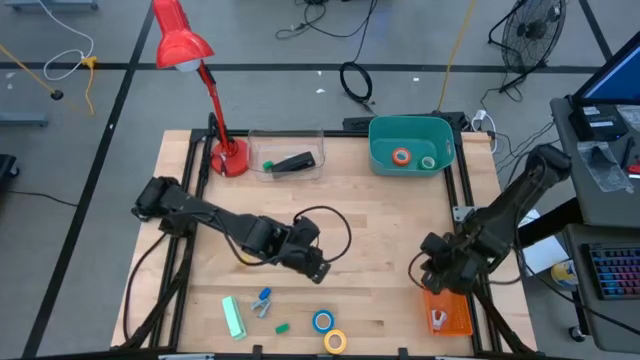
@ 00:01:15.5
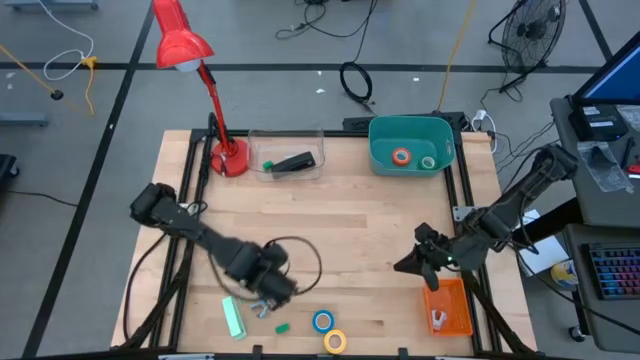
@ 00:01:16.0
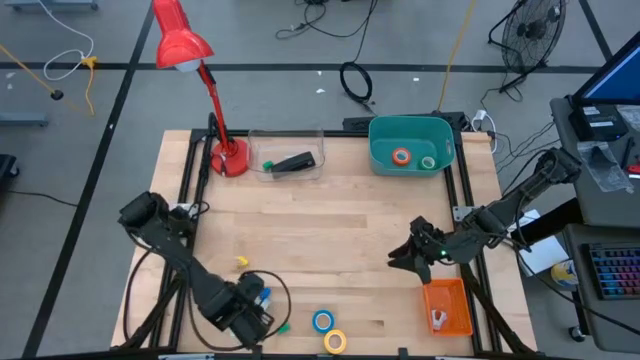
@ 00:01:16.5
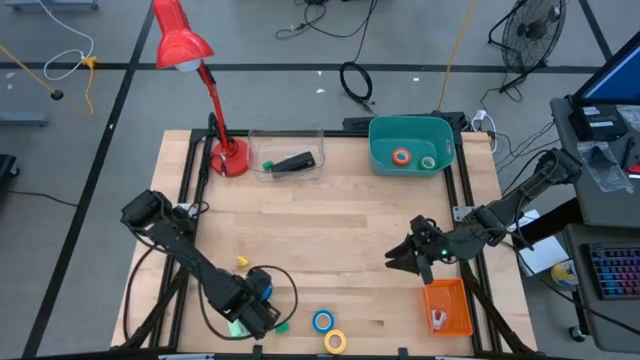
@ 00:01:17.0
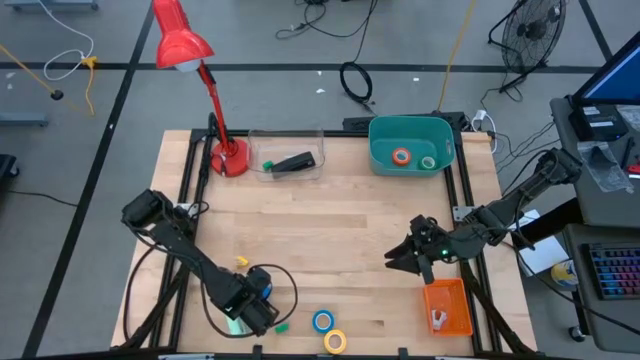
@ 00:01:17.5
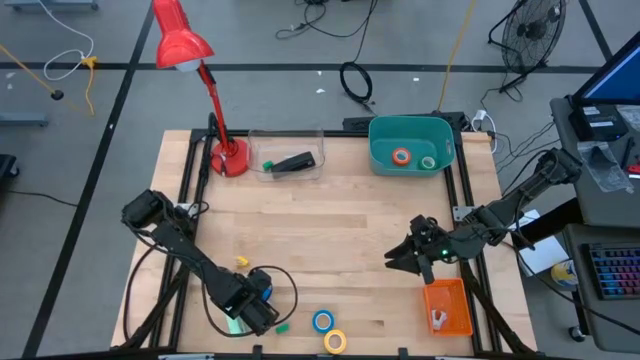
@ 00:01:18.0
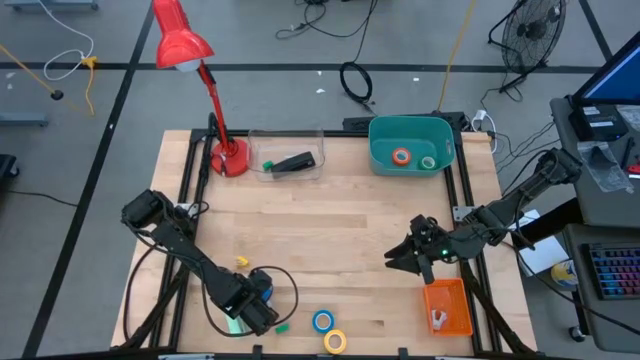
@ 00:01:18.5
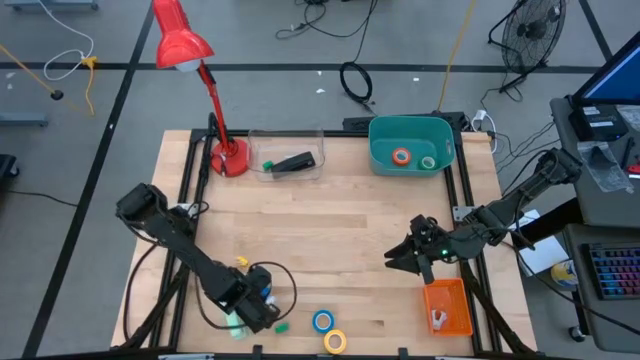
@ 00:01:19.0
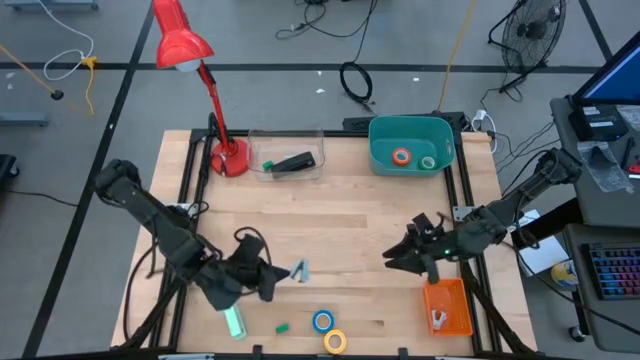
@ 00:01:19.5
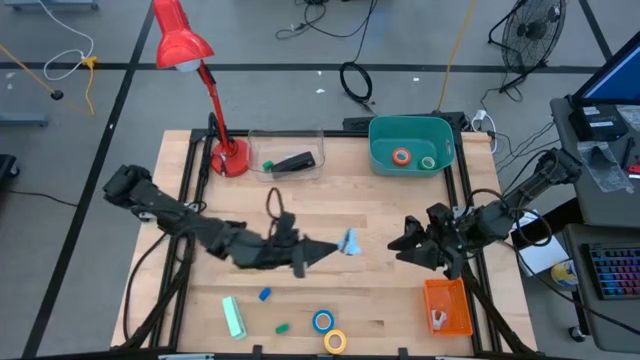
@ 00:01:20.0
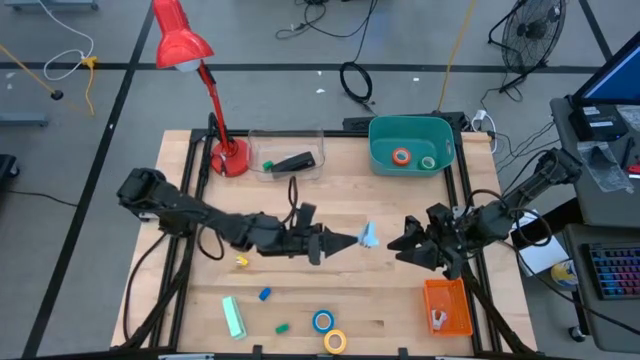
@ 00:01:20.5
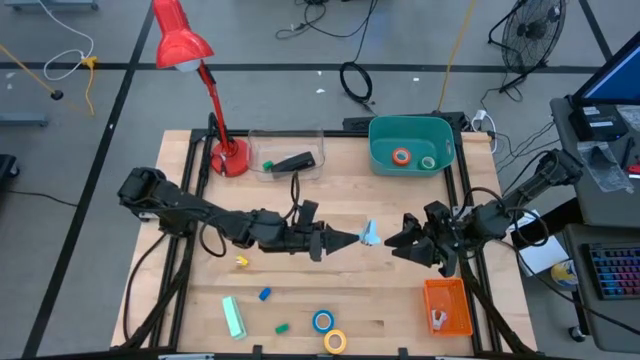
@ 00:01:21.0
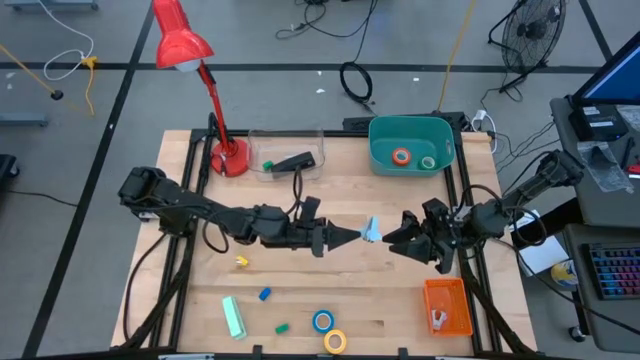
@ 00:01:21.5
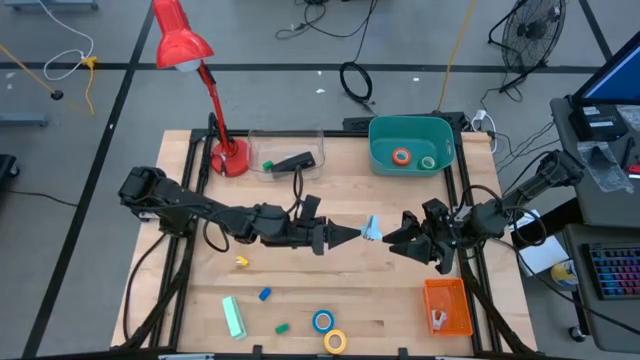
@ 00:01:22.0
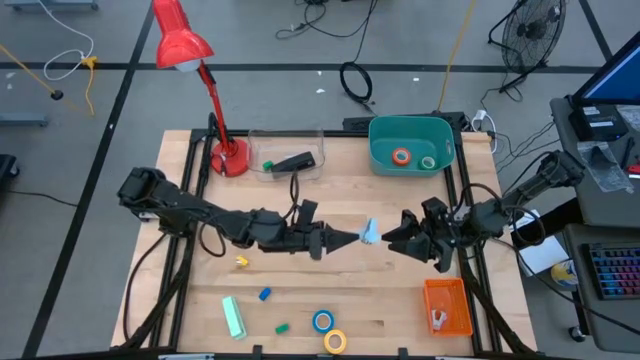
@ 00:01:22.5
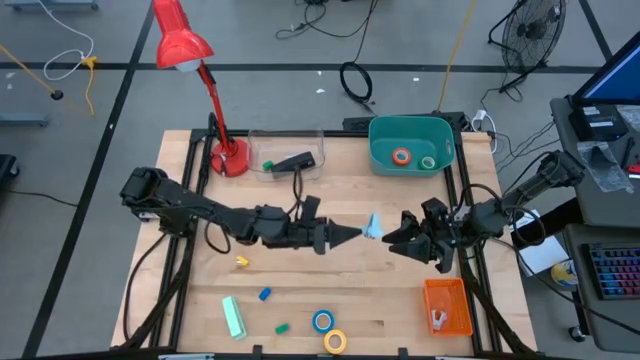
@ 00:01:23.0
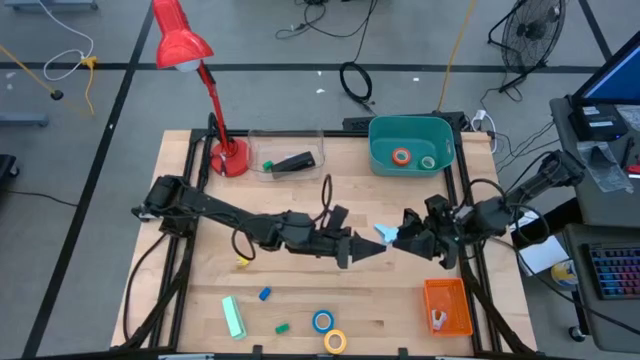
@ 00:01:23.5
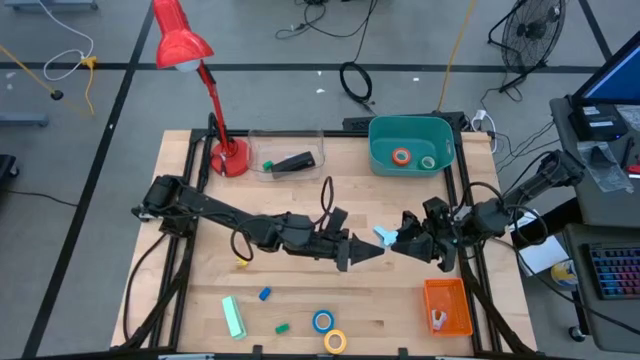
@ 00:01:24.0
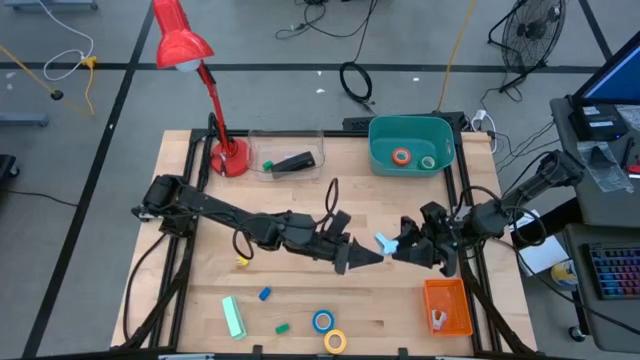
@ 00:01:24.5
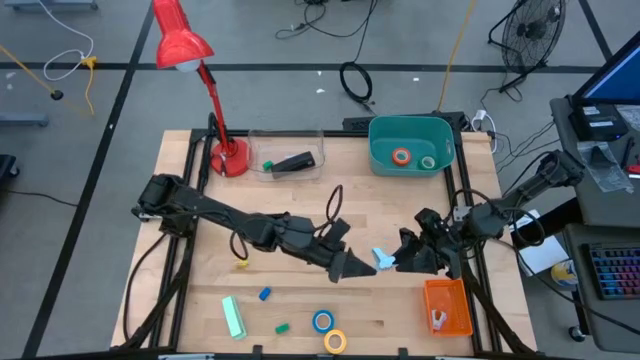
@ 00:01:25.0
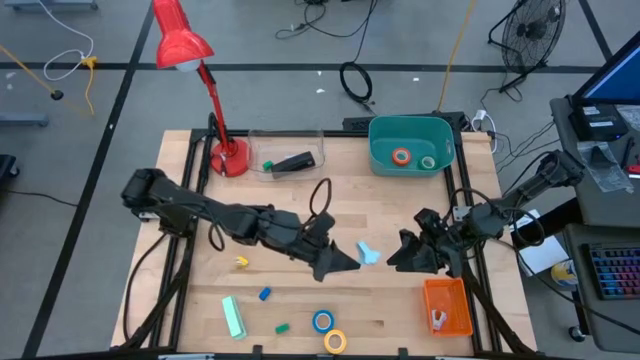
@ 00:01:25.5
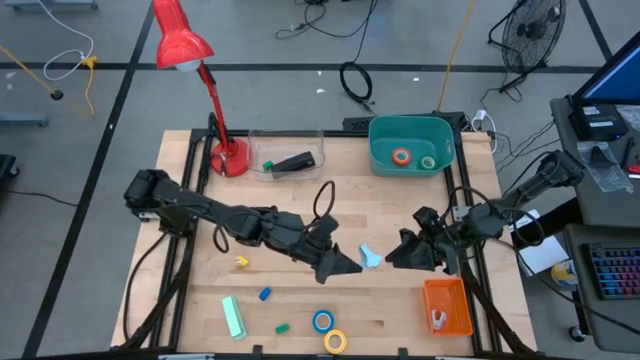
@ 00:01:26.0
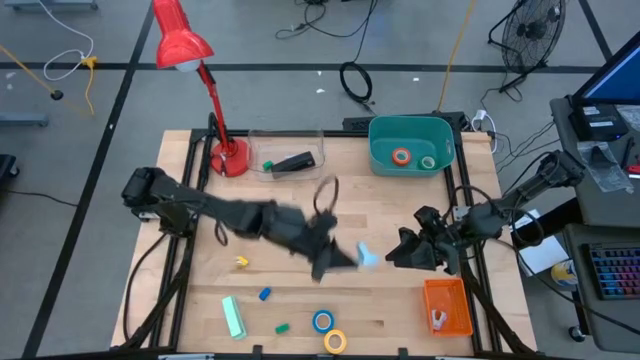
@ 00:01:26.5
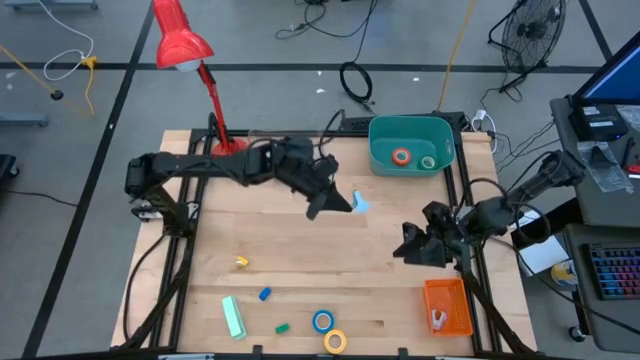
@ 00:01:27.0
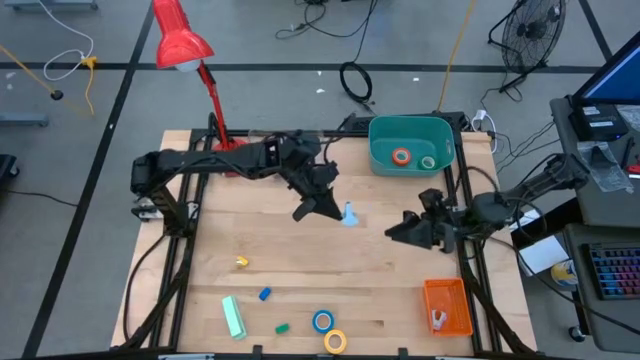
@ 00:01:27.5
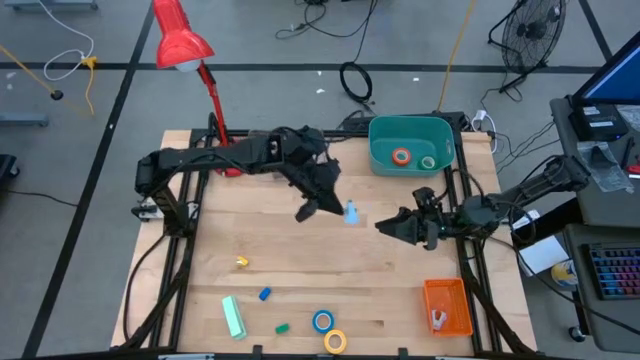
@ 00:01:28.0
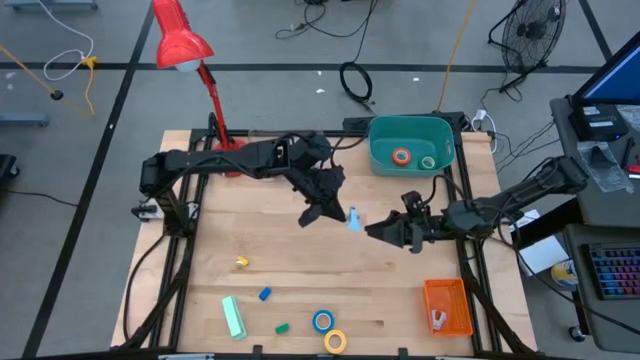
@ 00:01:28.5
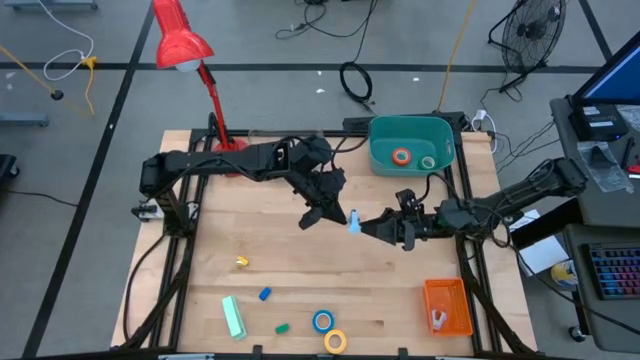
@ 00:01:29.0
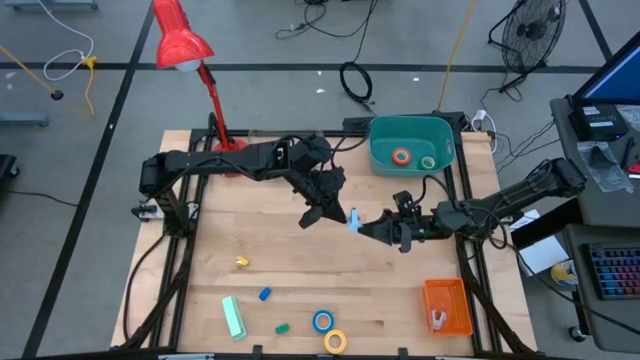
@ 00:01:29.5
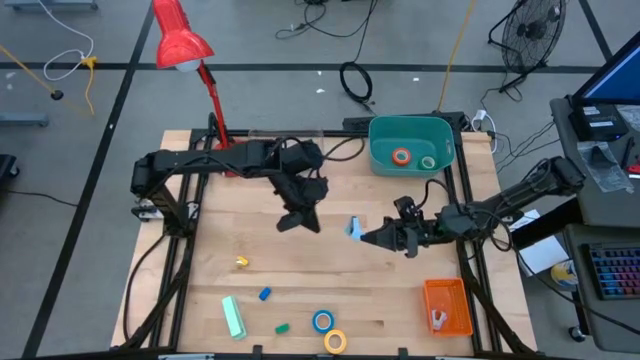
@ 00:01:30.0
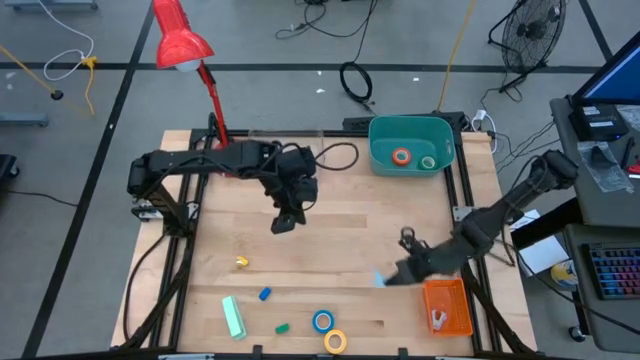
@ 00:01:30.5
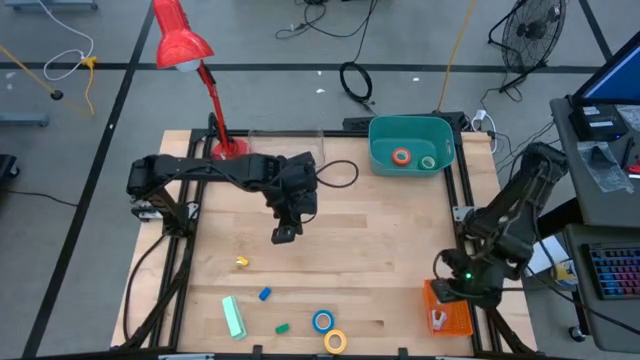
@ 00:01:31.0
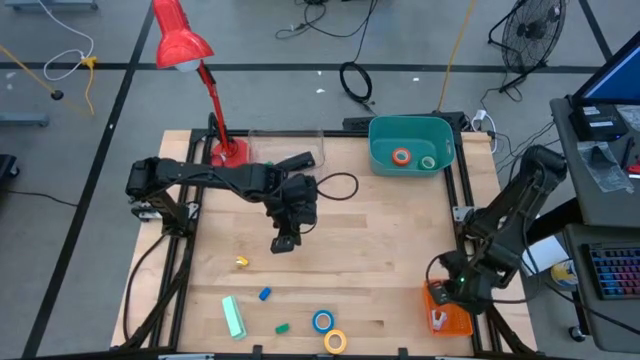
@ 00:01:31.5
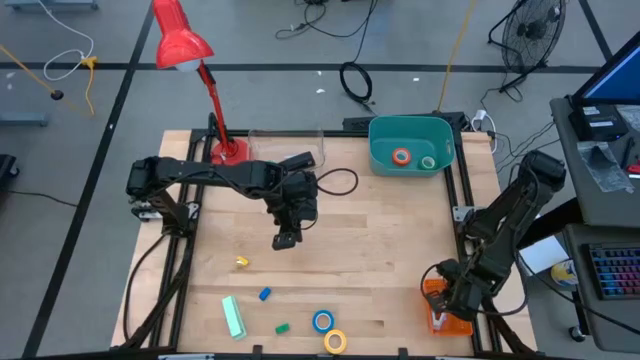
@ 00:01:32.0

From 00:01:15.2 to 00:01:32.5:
Task: Pick and place Stapler, Stapler remover, tape
Put the light blue staple remover into the orange bin

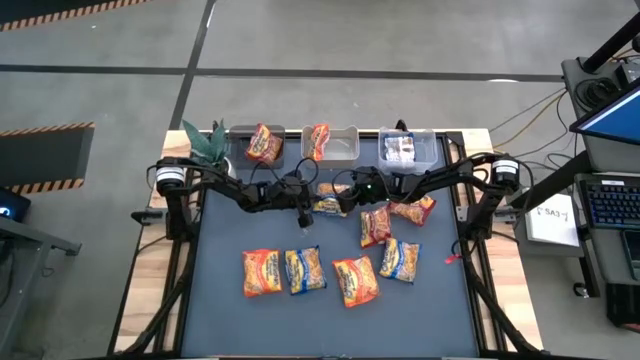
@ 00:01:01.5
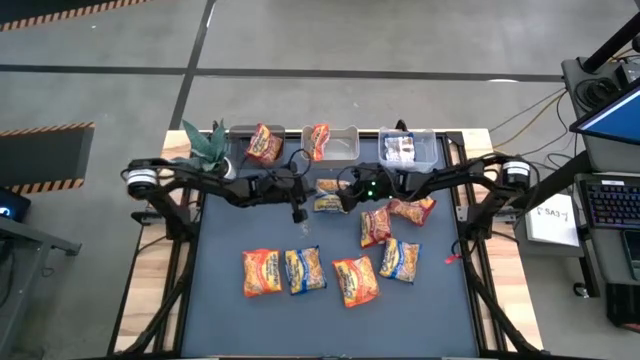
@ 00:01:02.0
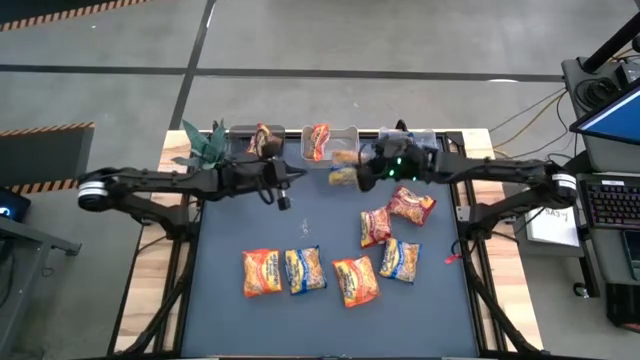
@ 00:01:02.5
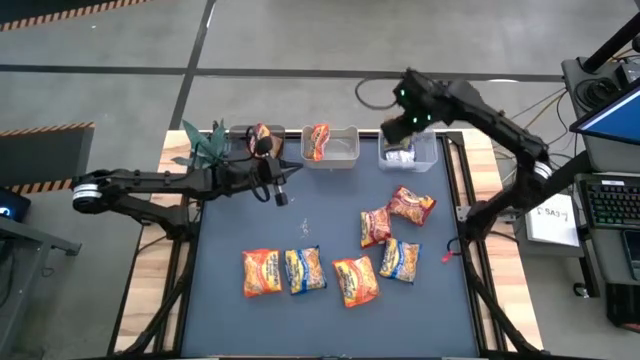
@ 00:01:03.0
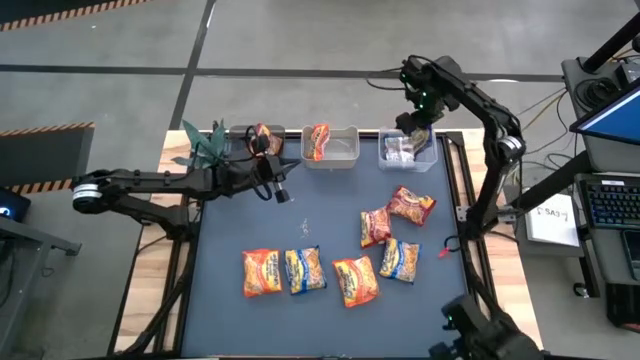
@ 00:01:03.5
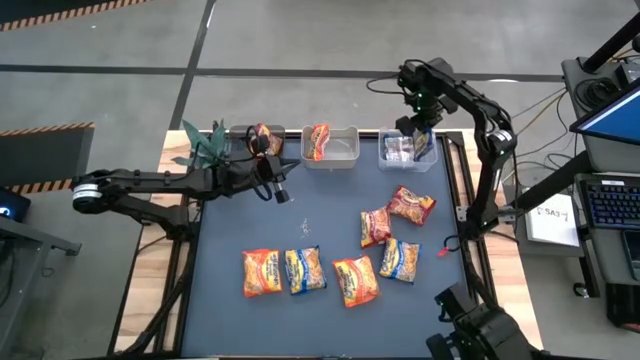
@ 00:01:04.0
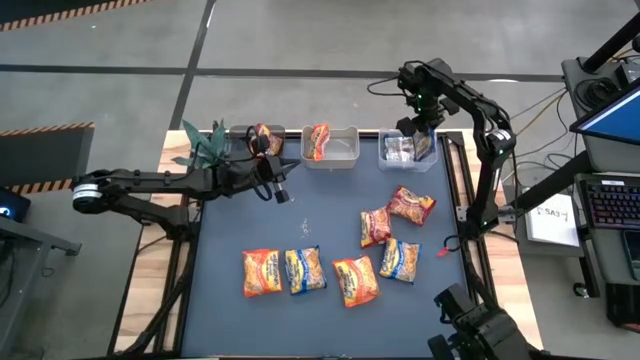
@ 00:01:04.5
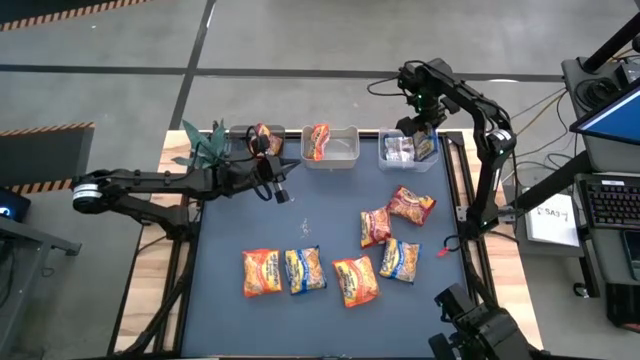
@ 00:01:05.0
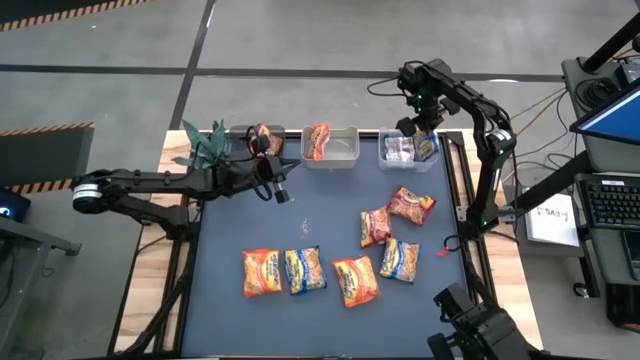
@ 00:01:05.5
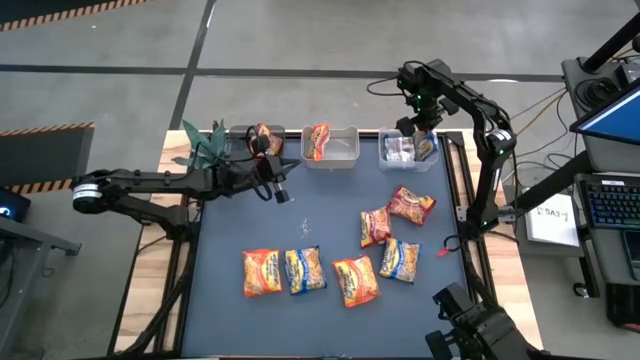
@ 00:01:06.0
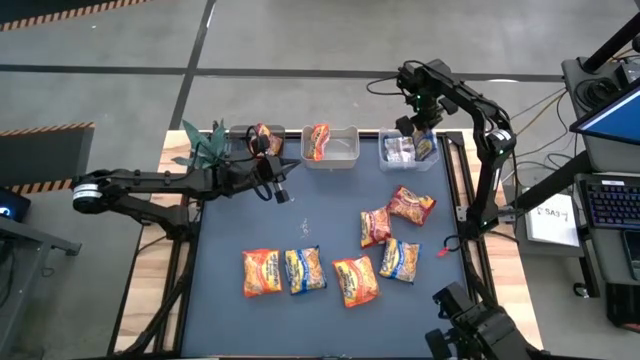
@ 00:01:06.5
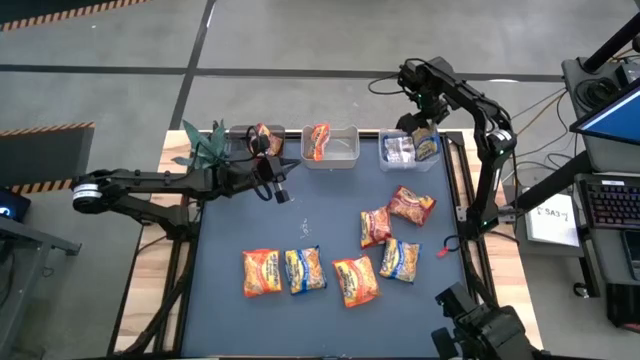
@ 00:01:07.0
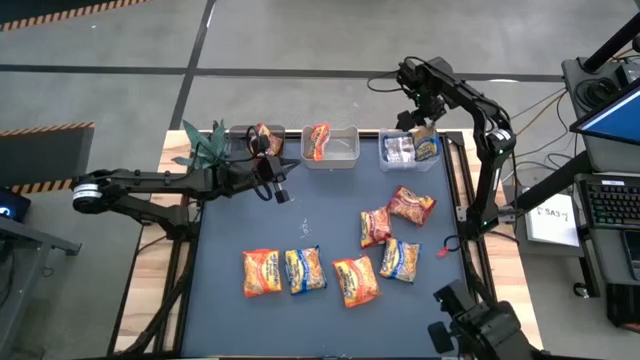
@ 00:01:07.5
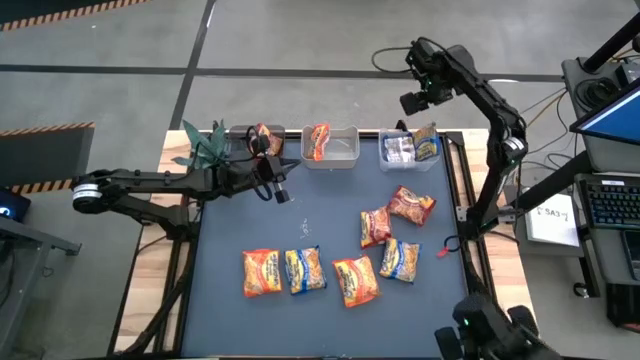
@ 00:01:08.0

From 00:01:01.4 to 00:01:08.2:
Task: Sort Maruchan noodles
Put the center blue noodle pack into the transparent white bin
